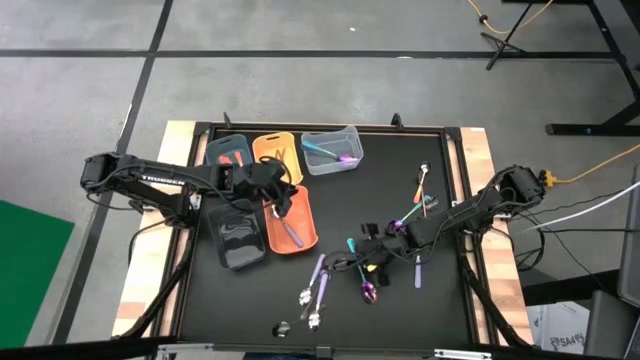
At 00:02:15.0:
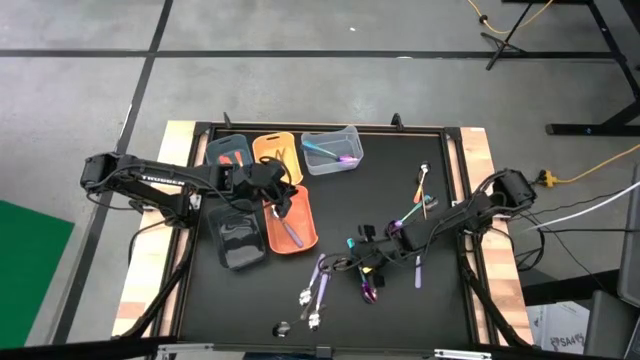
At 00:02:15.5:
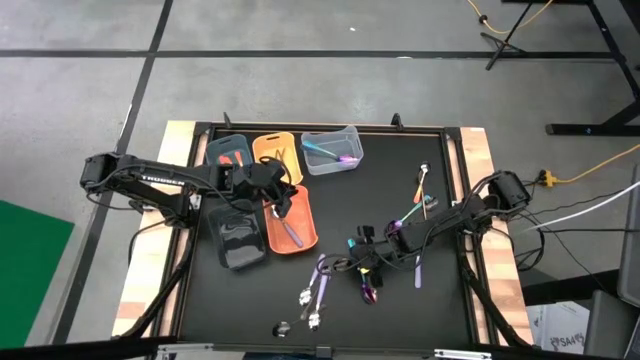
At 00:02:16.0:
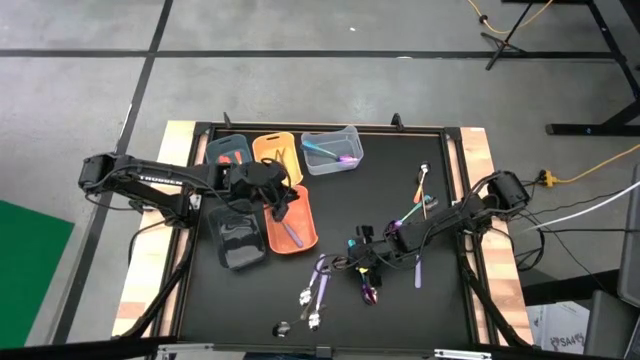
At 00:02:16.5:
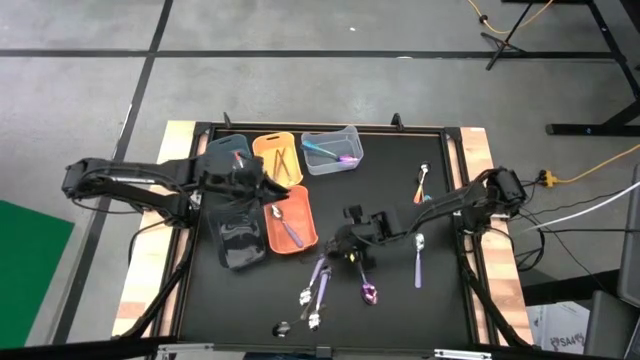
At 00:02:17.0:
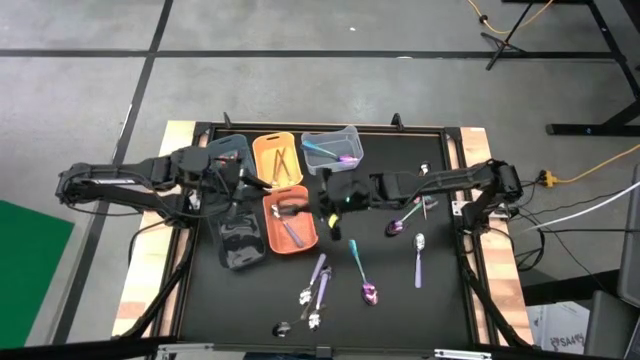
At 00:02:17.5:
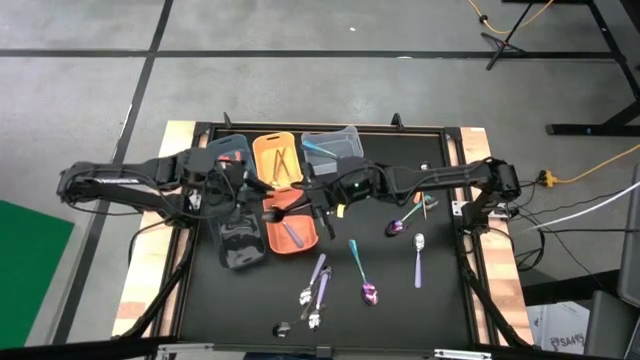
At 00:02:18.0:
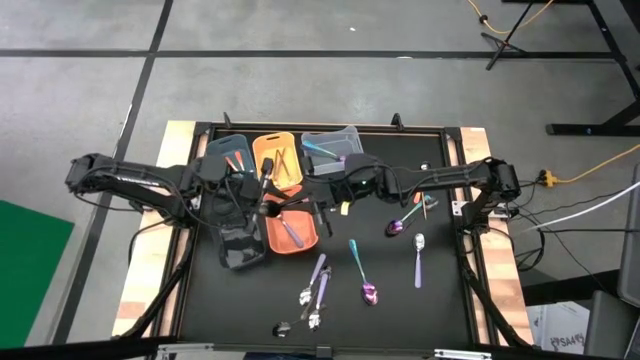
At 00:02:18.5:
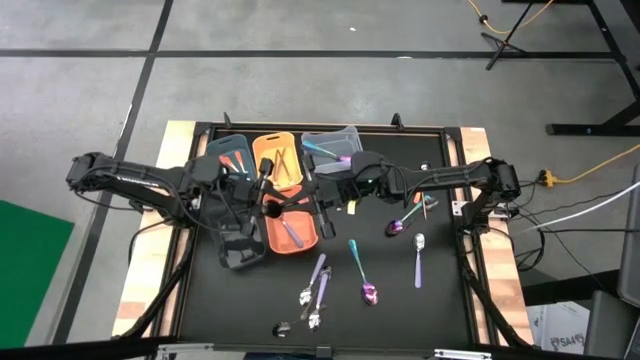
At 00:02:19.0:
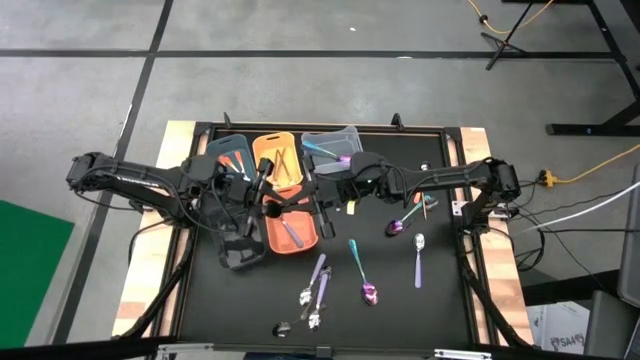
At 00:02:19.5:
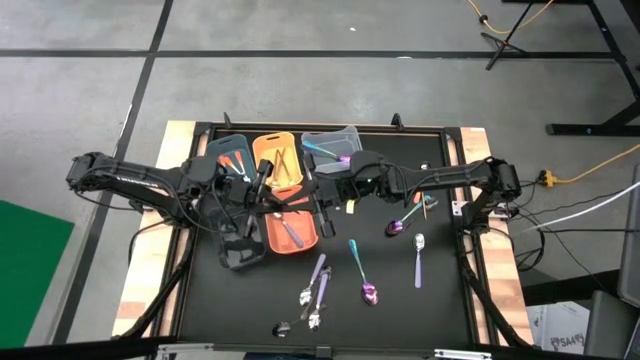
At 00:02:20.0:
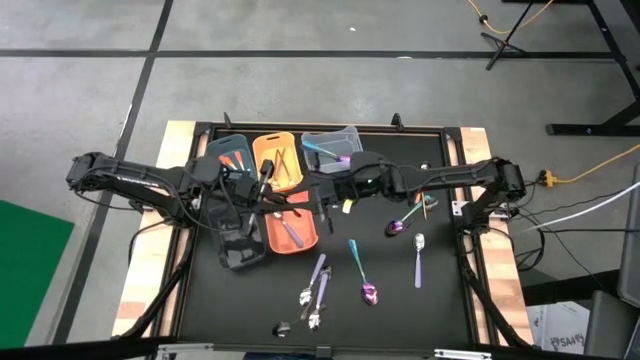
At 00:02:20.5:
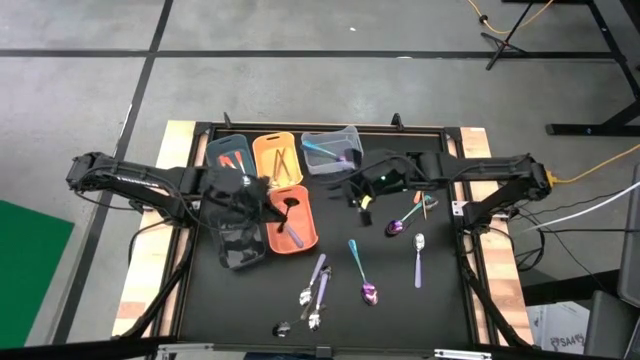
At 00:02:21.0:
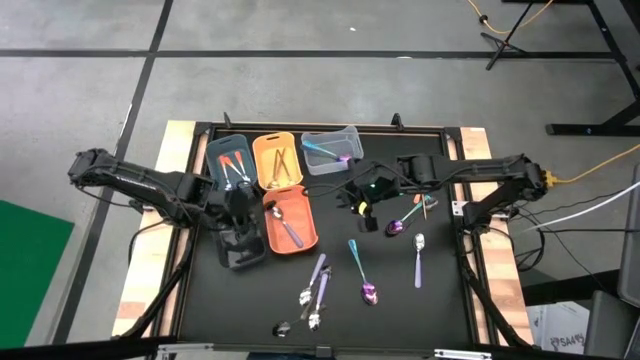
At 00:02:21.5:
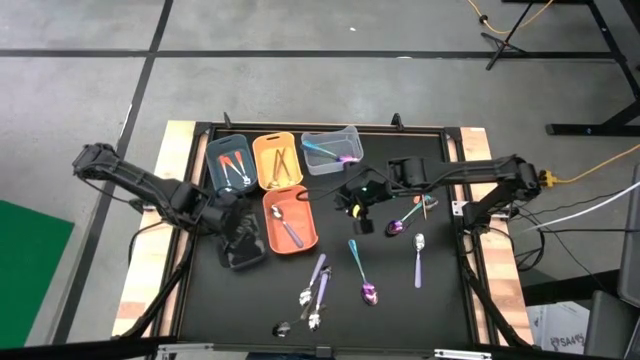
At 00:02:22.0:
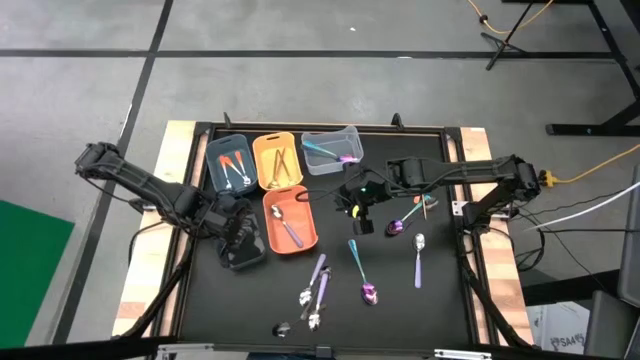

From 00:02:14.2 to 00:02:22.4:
Task: Sort silverware by color (type)
Put the black spoon into the black bin

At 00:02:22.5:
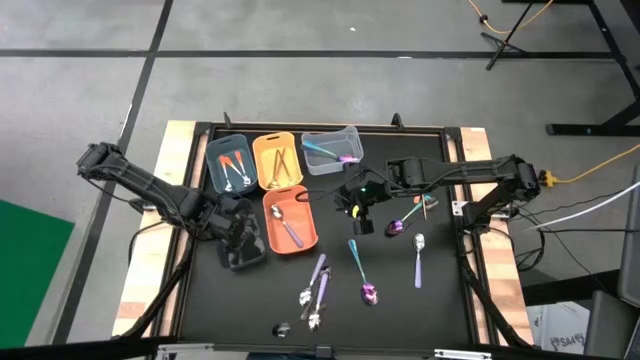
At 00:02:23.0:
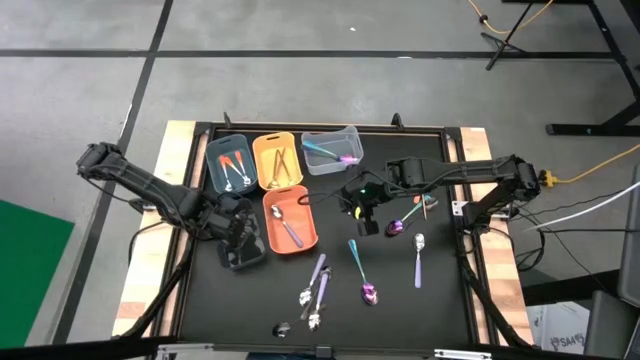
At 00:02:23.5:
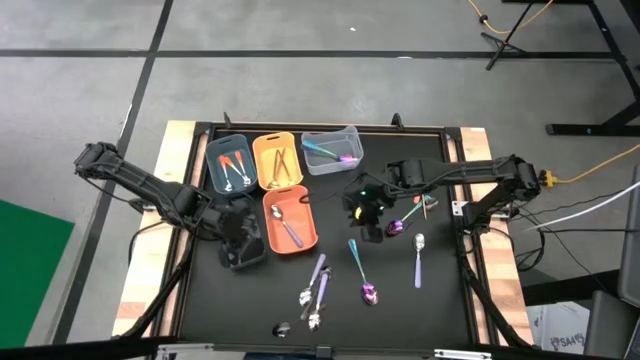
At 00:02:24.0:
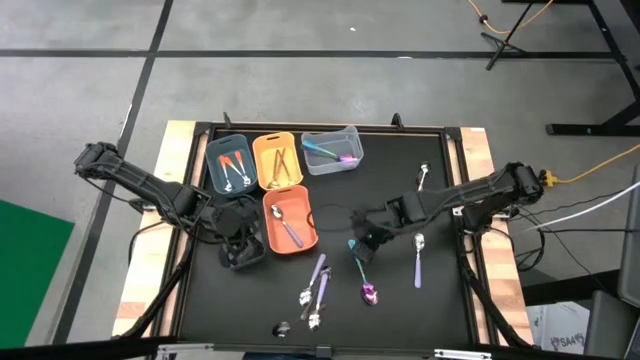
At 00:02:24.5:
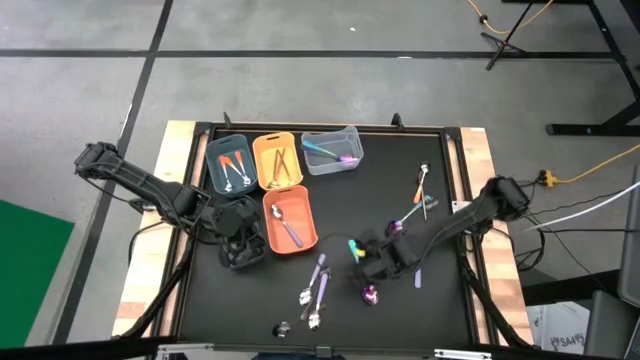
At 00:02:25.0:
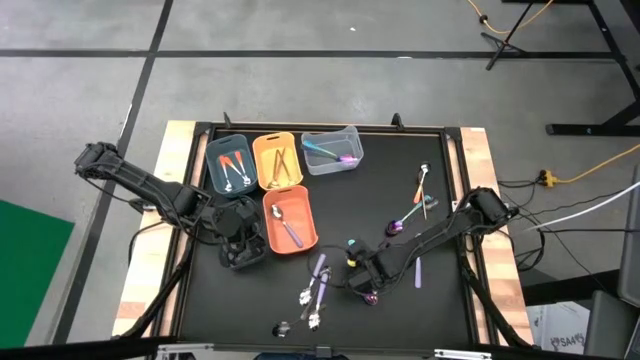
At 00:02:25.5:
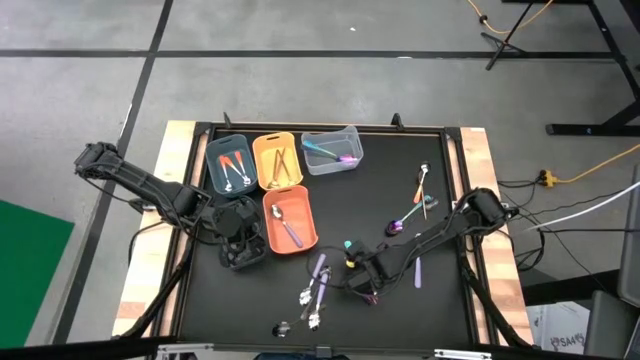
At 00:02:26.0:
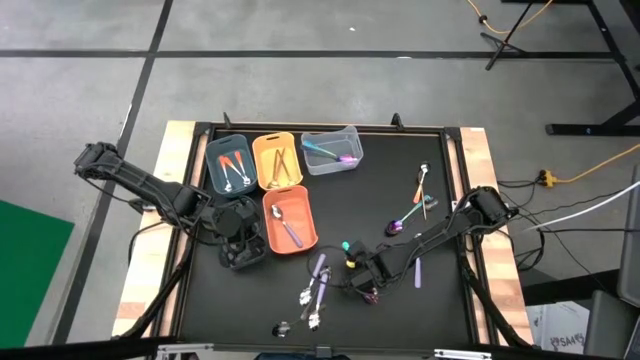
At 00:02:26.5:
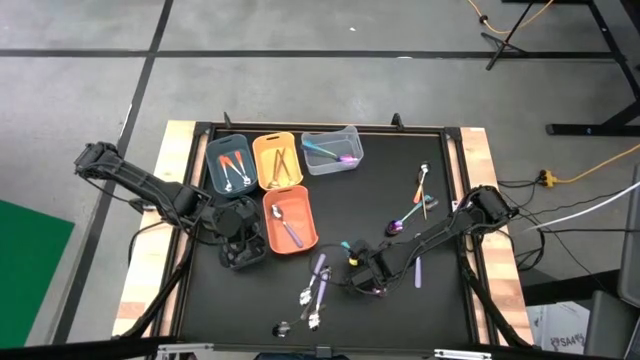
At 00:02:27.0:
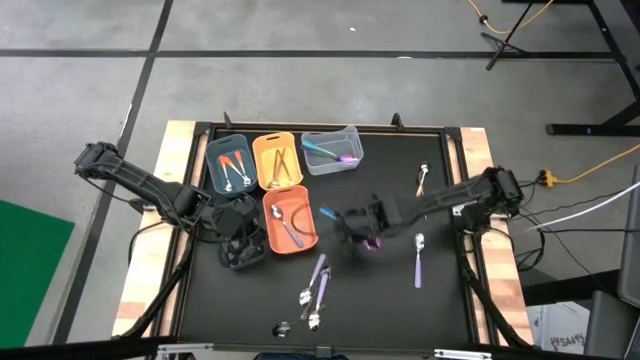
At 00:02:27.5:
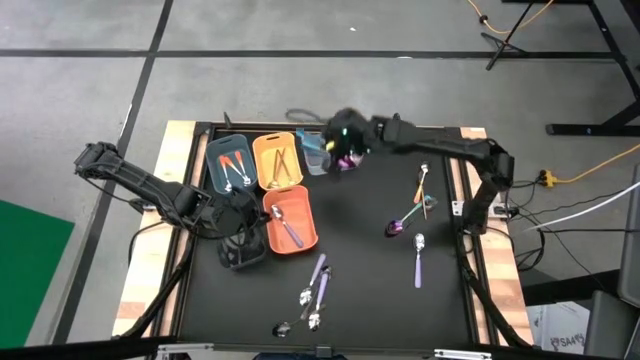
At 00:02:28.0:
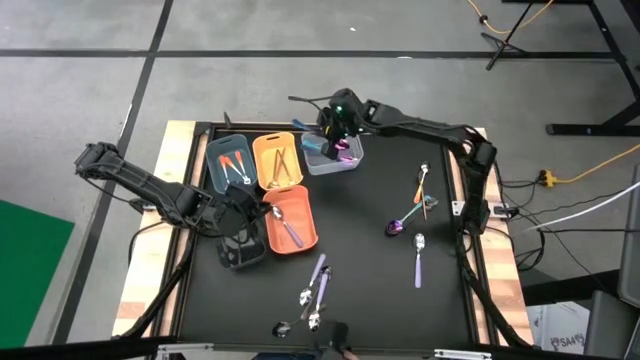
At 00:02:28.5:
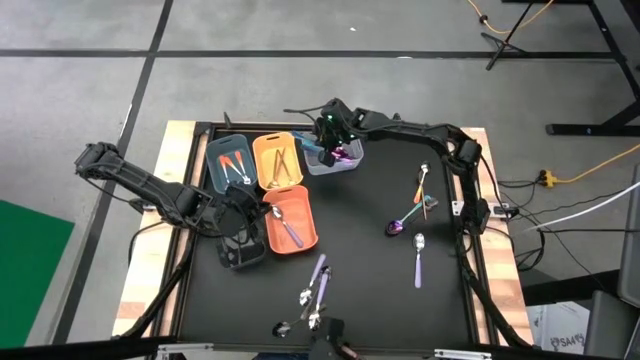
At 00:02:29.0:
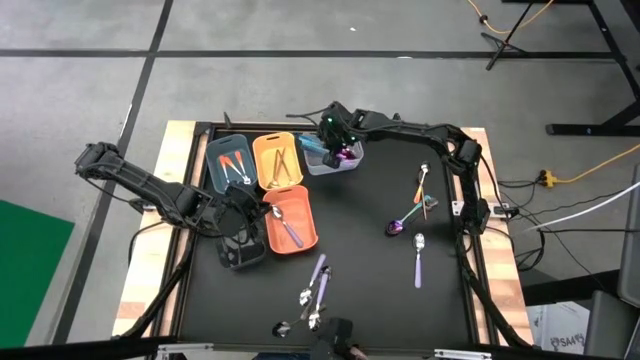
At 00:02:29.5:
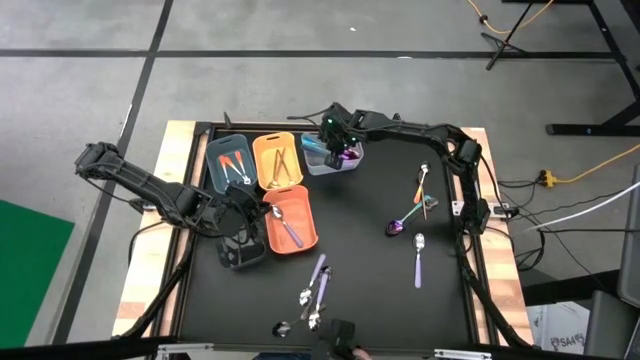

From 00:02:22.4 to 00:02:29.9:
Put the blue spoon into the transparent bin
